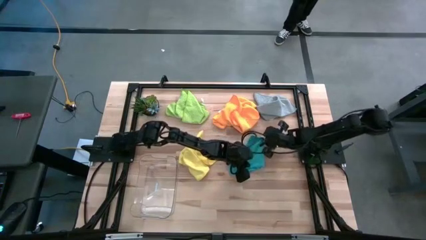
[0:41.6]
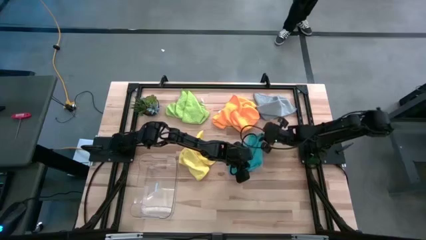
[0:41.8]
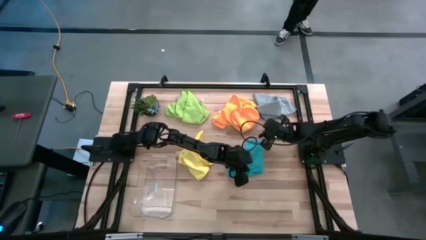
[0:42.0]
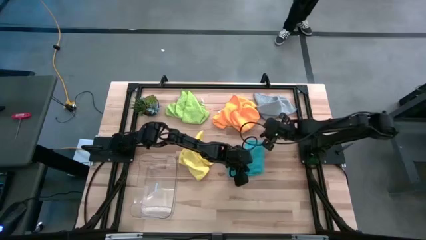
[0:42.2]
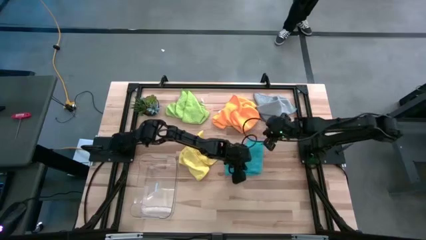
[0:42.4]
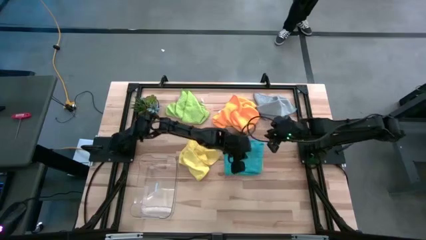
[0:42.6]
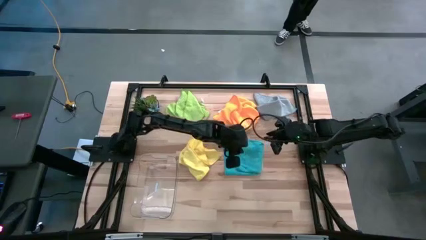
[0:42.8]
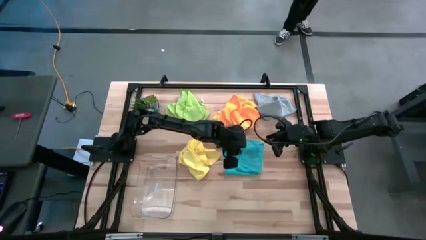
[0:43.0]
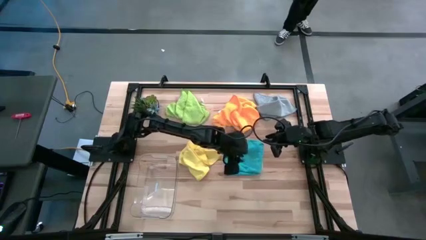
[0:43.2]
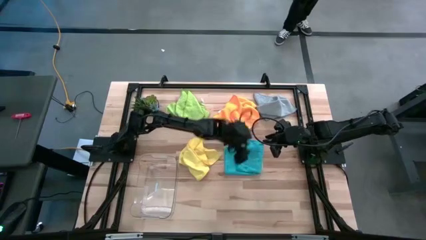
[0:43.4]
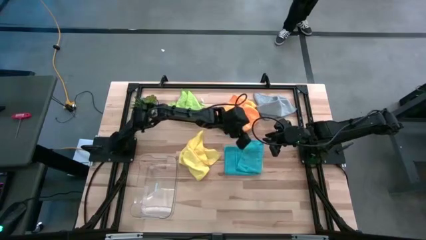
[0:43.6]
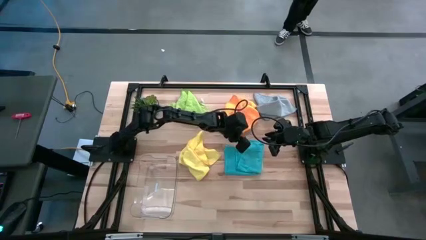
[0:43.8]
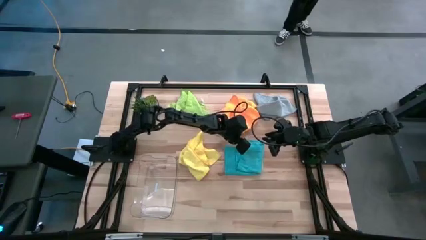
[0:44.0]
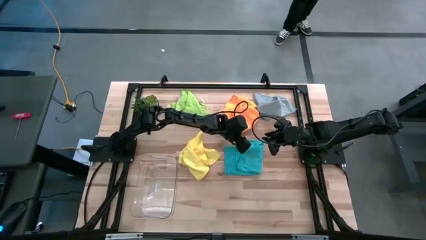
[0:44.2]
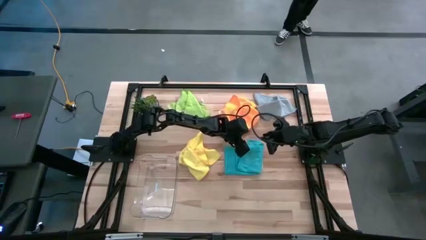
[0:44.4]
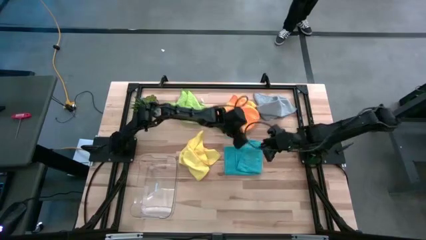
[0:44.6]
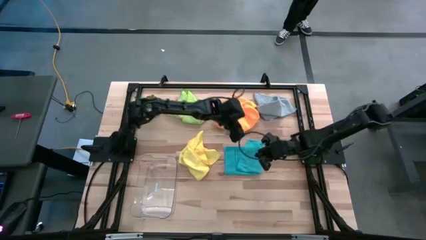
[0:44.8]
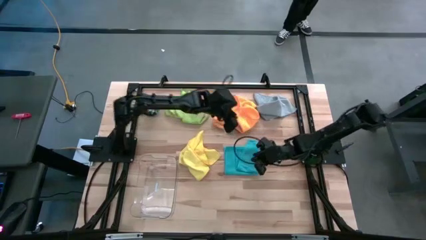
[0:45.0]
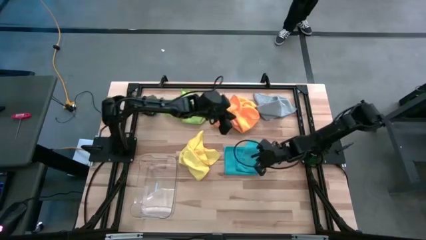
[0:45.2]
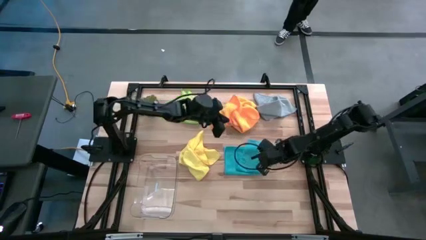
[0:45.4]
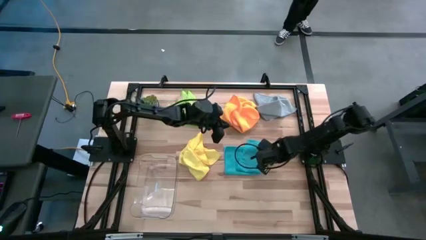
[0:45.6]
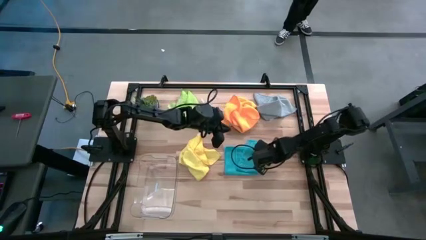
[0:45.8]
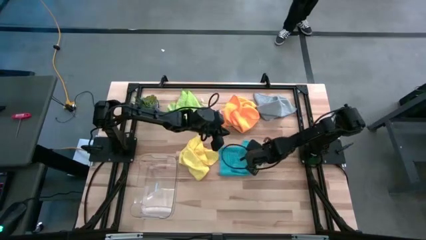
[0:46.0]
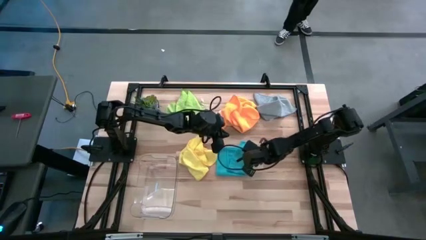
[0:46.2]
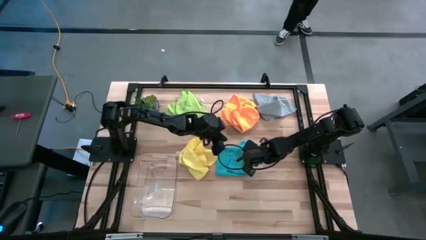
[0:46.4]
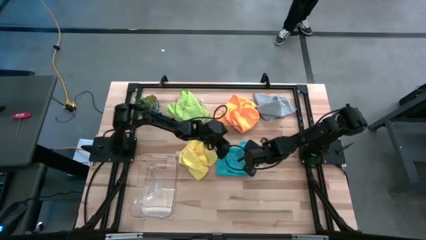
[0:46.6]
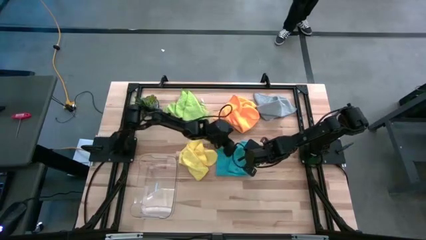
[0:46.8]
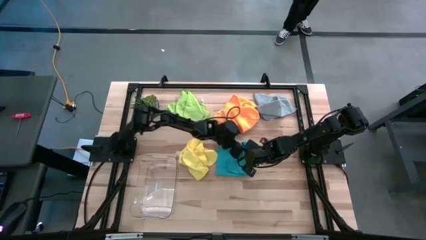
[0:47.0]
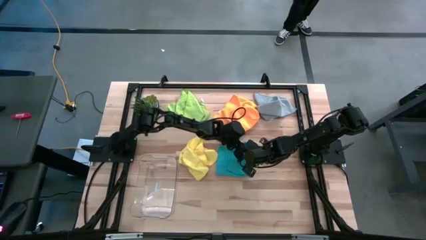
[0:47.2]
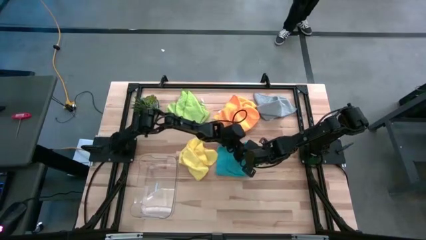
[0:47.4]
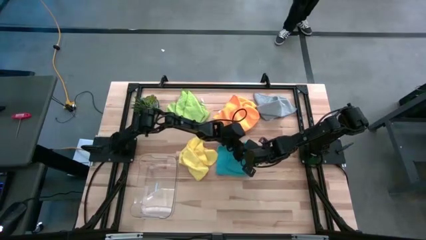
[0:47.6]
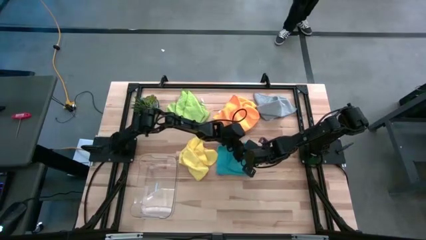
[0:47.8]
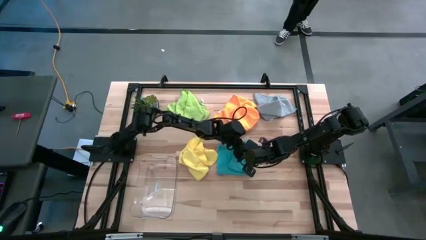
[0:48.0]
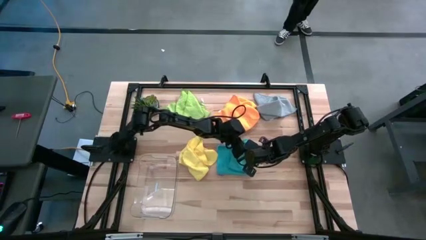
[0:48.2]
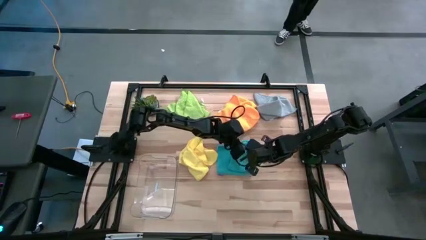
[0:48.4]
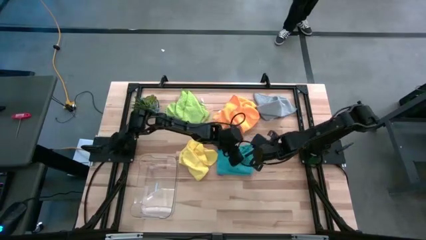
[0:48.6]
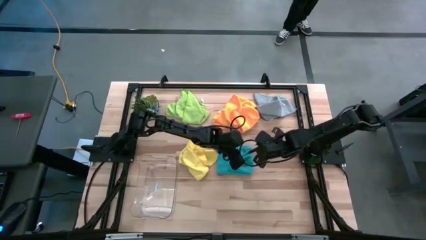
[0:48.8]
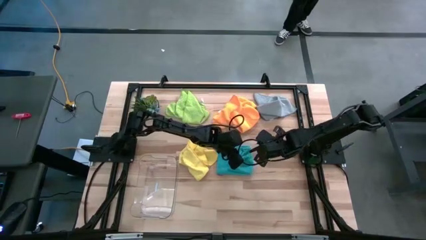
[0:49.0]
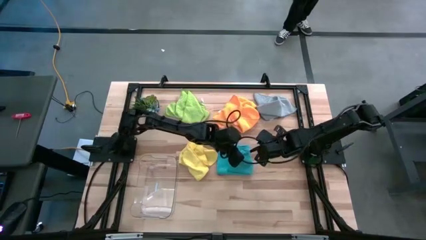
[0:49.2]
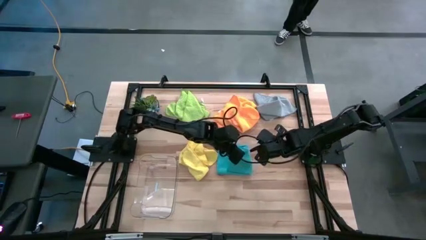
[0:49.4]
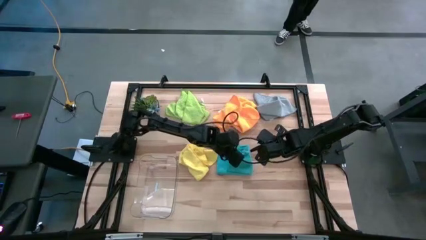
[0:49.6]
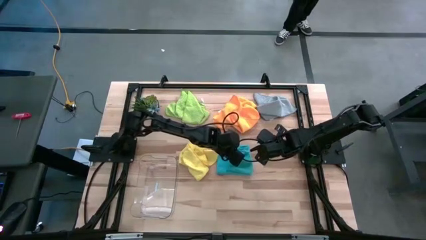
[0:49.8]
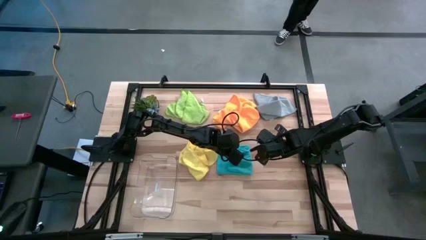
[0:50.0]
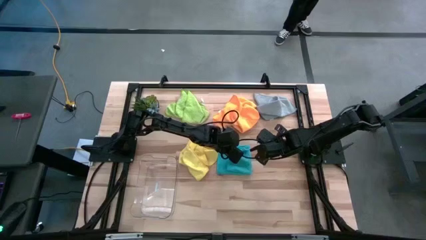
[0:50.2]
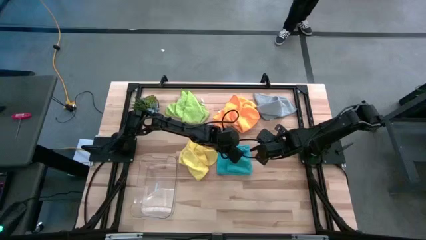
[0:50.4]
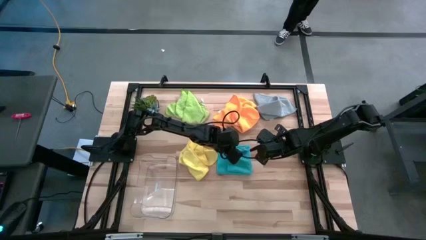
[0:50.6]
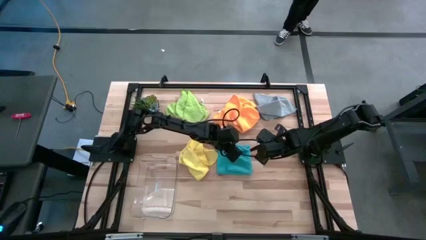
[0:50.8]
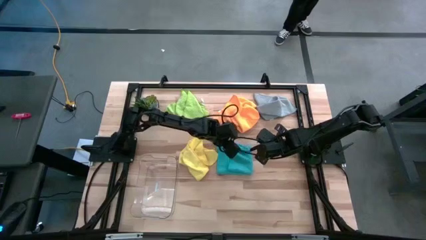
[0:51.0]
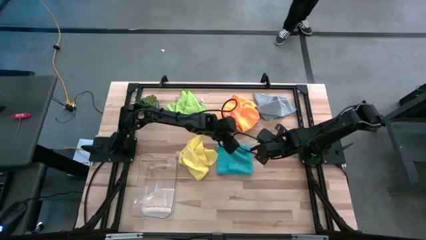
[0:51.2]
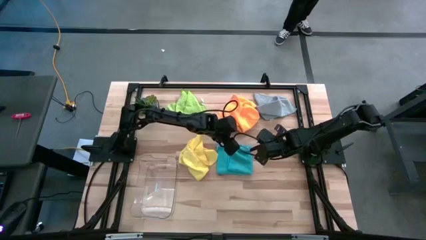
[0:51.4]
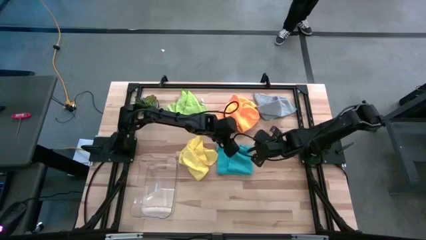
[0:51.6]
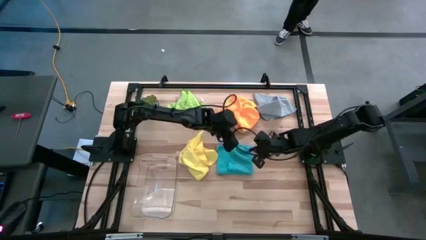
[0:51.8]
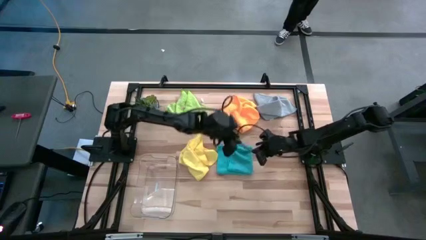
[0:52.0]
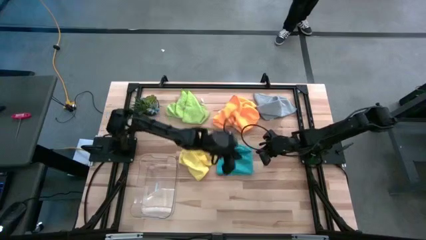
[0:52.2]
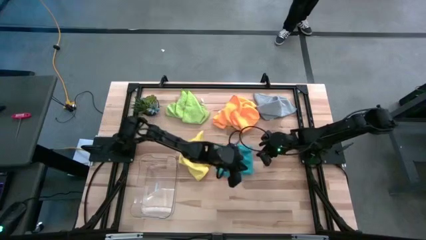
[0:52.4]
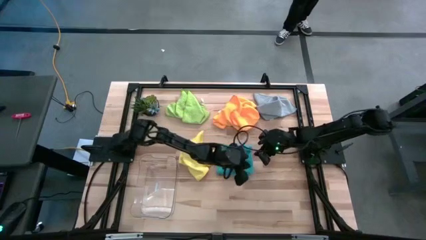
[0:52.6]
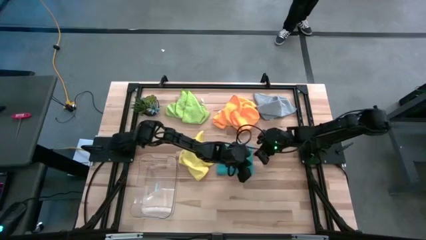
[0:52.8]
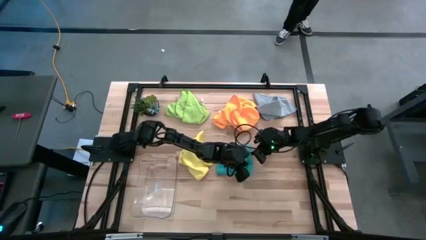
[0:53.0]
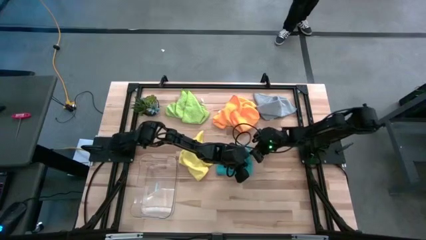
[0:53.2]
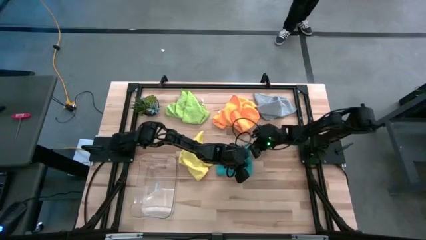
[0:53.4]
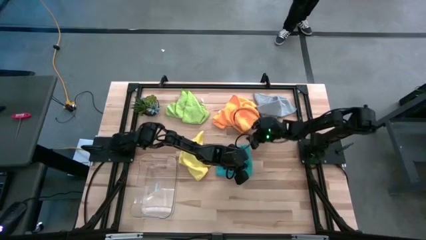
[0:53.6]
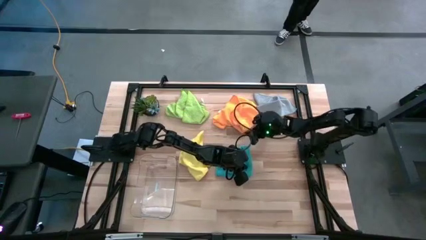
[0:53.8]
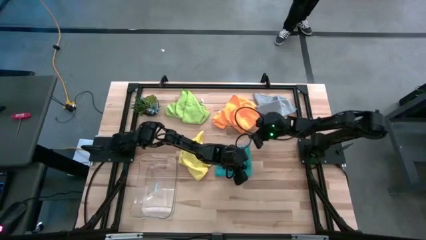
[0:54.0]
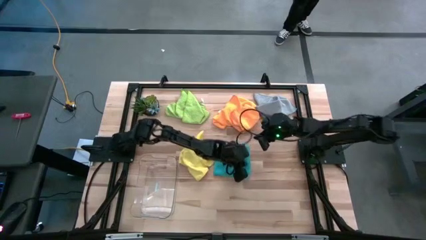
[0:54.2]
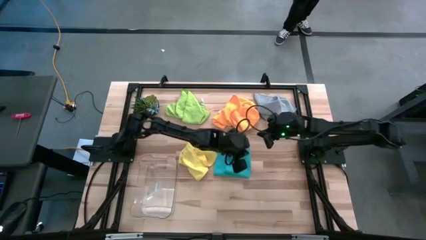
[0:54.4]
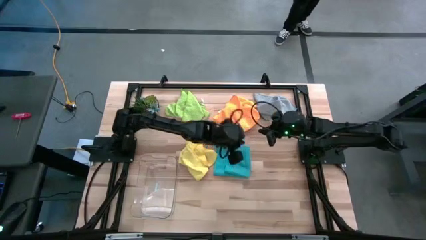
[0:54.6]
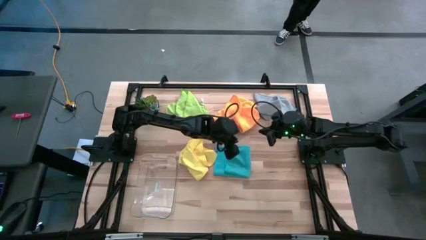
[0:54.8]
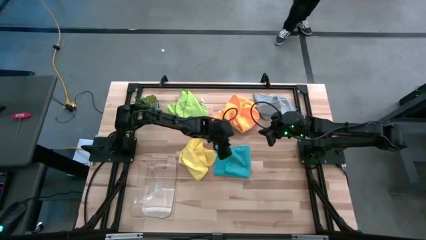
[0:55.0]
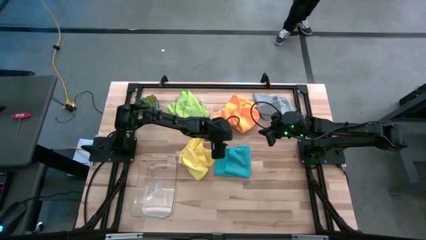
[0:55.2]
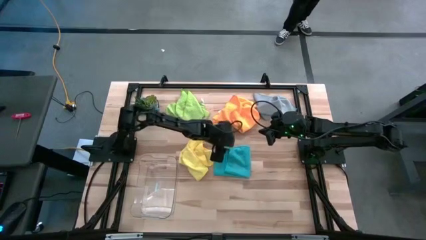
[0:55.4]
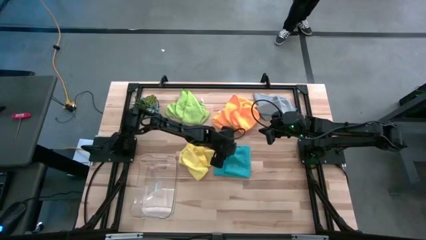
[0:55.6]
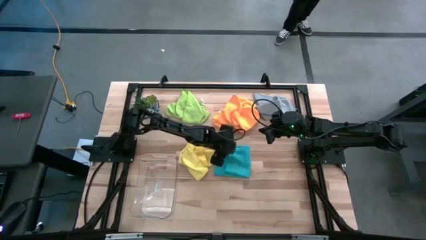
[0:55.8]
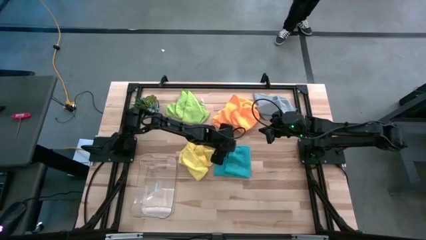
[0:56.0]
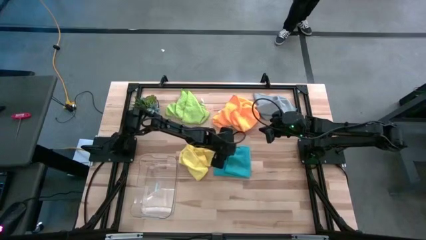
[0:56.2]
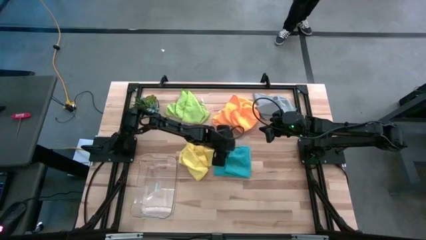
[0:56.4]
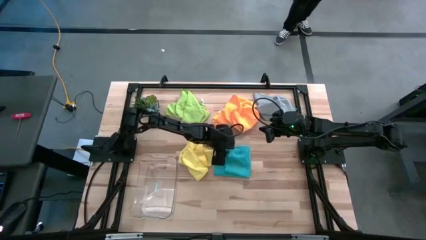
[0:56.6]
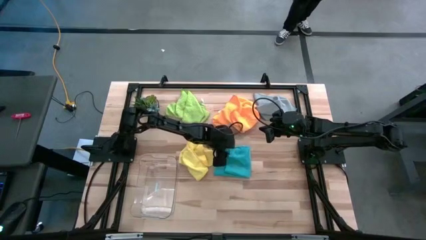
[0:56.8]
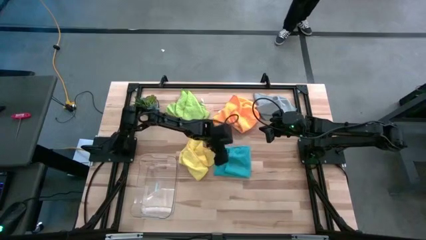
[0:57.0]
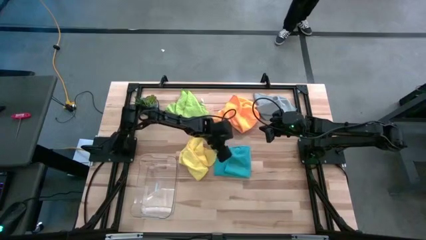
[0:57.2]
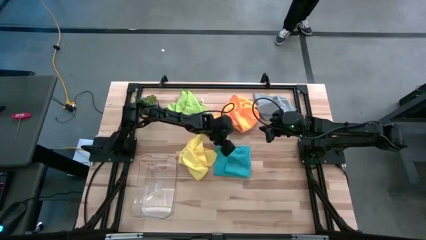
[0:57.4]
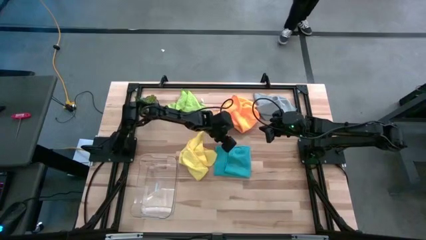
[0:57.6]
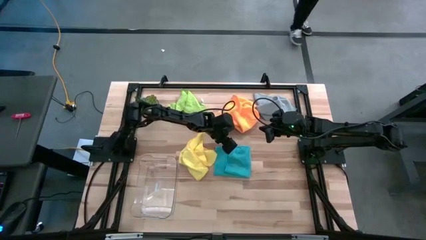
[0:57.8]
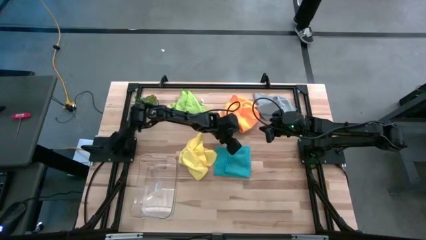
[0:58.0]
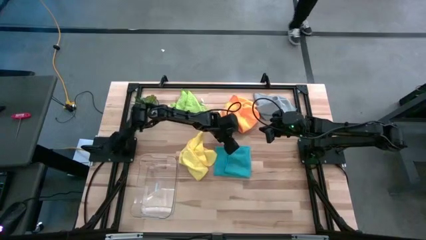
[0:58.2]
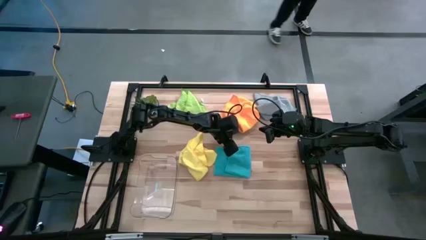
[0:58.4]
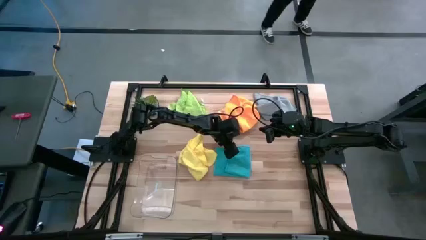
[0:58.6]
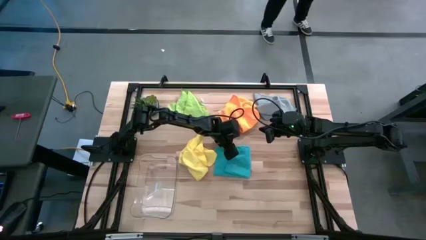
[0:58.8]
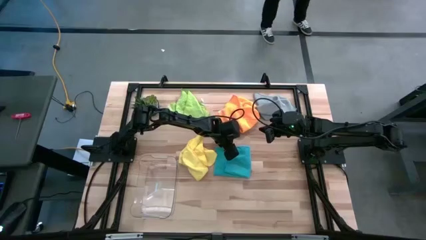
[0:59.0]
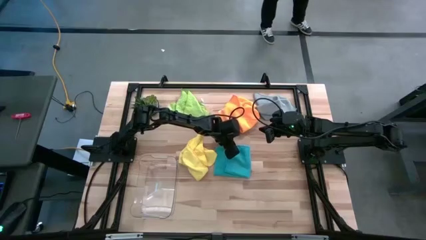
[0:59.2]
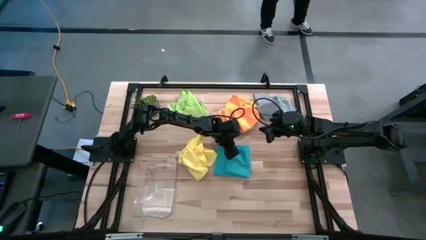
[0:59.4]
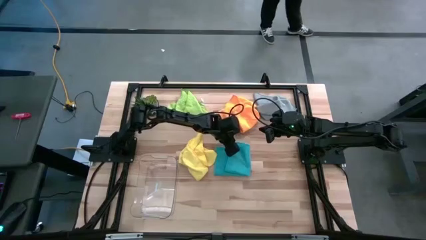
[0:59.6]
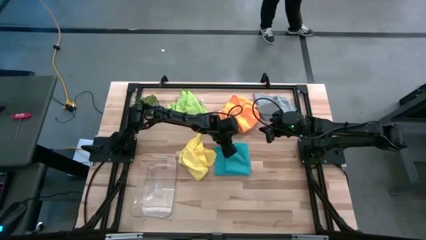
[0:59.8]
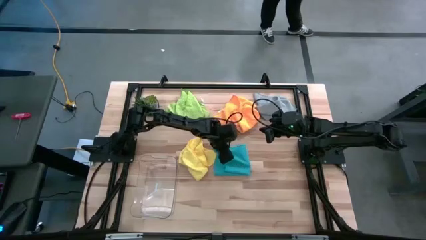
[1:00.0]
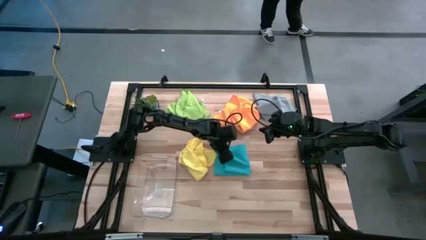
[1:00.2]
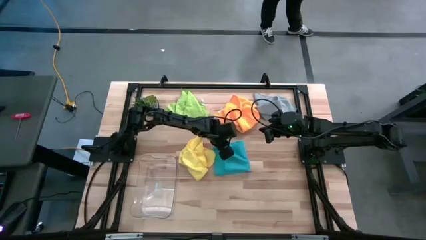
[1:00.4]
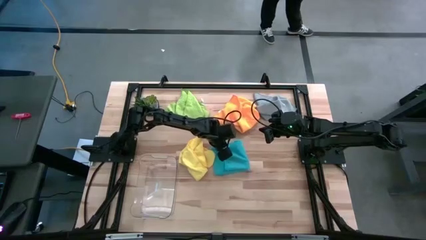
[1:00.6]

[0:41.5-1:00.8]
Task: Fold microfiber towels
Fold the blue towel
